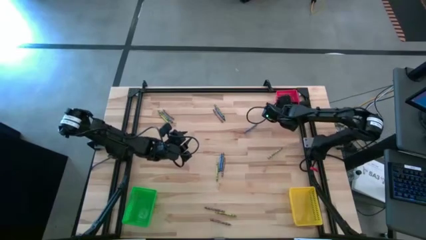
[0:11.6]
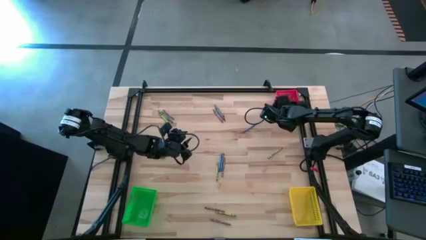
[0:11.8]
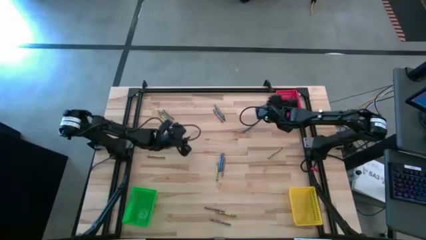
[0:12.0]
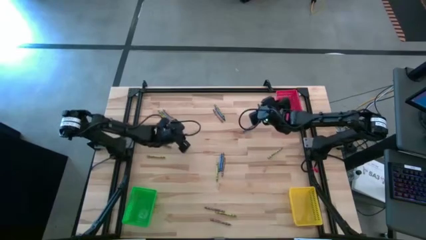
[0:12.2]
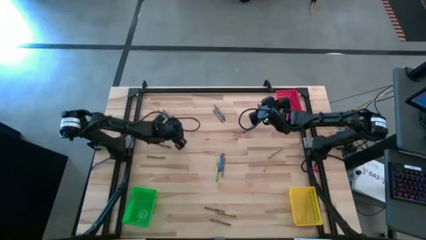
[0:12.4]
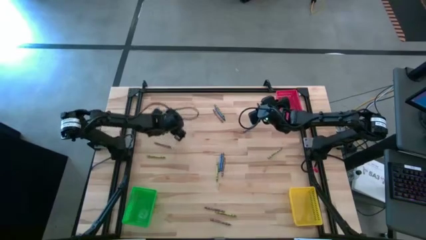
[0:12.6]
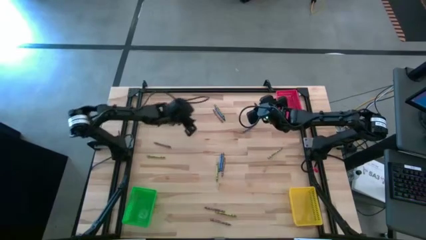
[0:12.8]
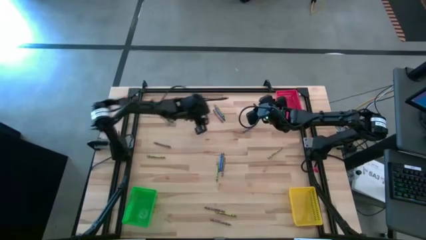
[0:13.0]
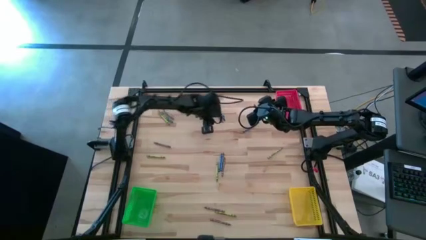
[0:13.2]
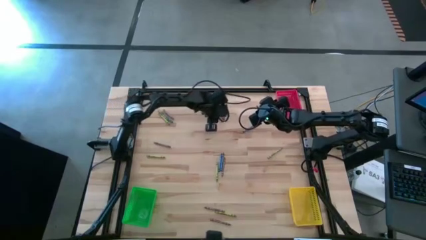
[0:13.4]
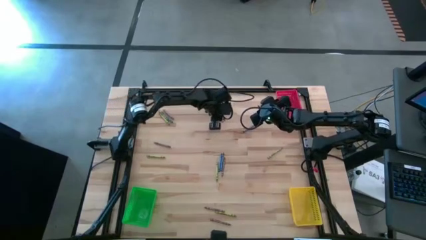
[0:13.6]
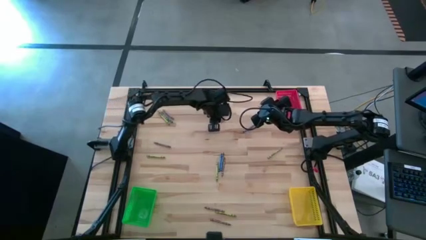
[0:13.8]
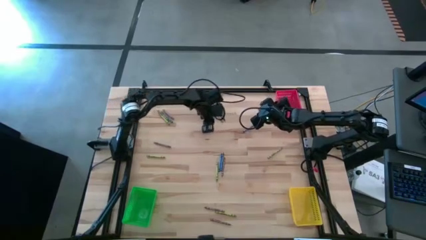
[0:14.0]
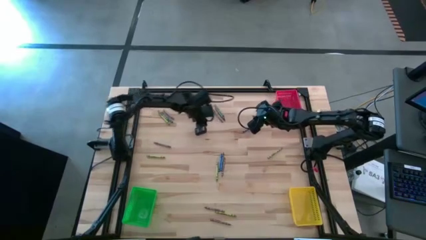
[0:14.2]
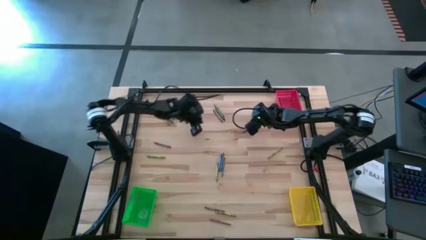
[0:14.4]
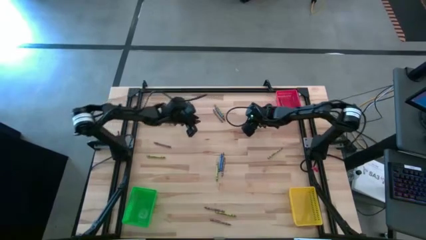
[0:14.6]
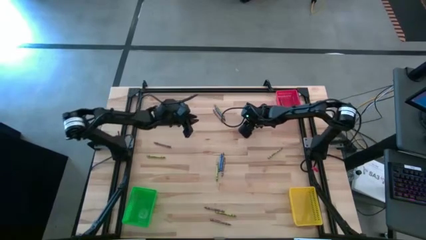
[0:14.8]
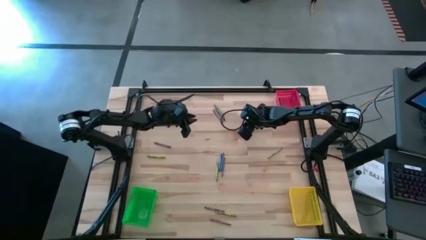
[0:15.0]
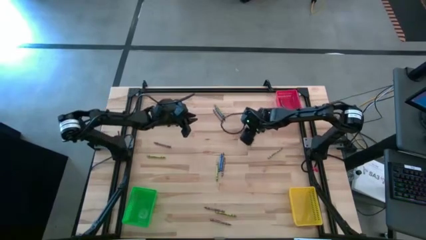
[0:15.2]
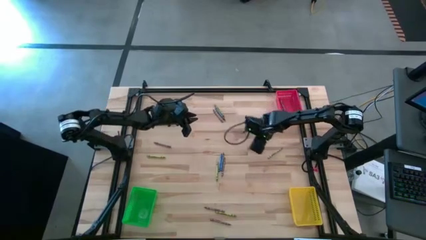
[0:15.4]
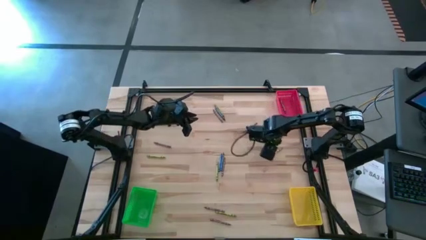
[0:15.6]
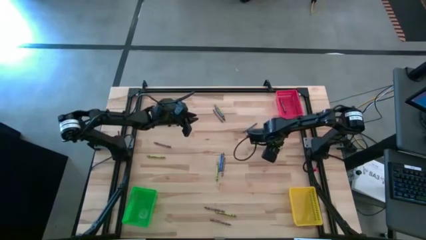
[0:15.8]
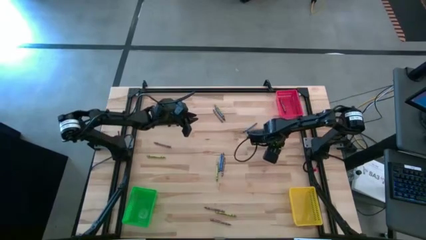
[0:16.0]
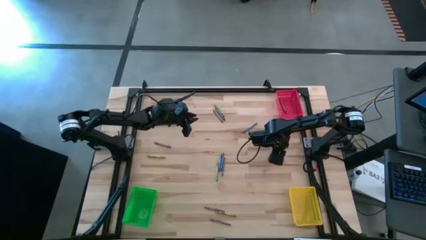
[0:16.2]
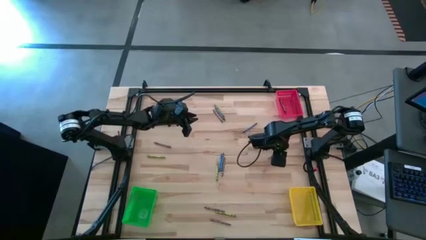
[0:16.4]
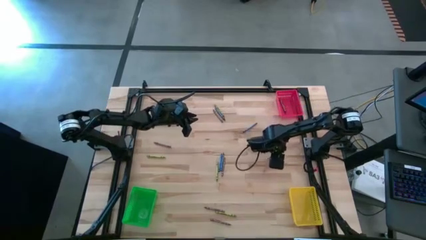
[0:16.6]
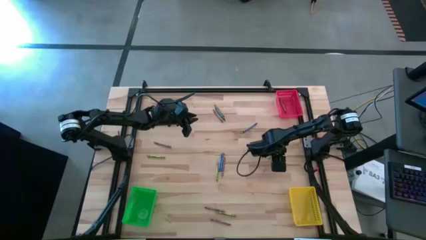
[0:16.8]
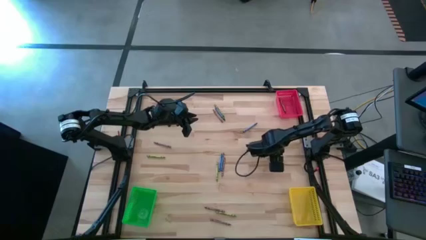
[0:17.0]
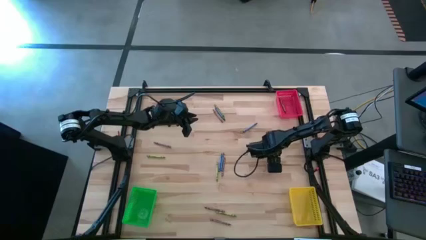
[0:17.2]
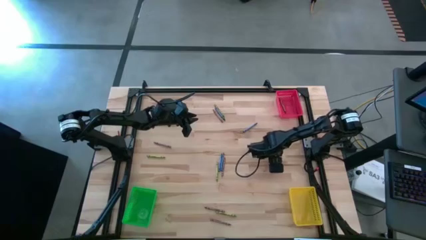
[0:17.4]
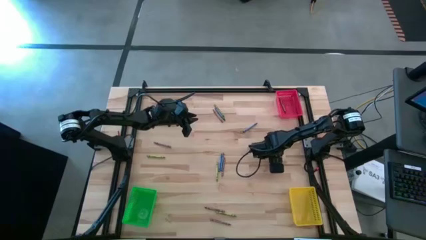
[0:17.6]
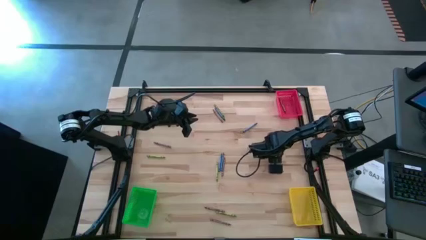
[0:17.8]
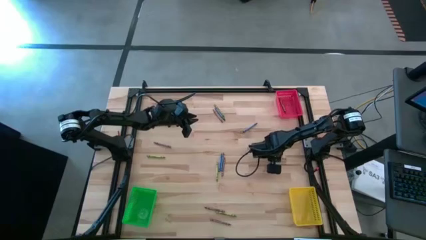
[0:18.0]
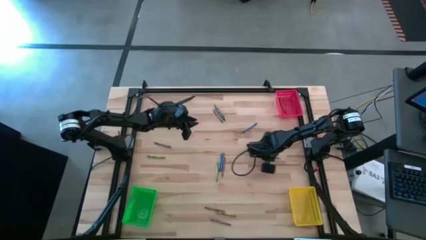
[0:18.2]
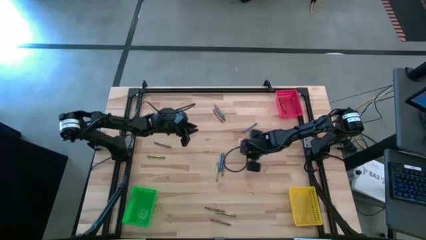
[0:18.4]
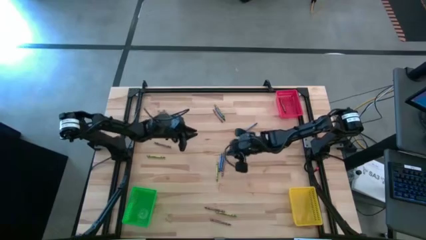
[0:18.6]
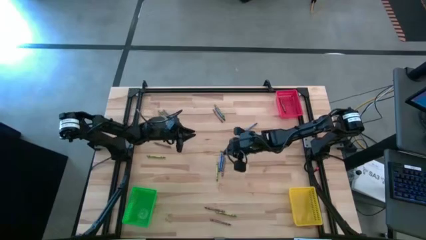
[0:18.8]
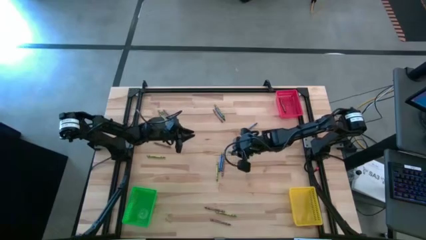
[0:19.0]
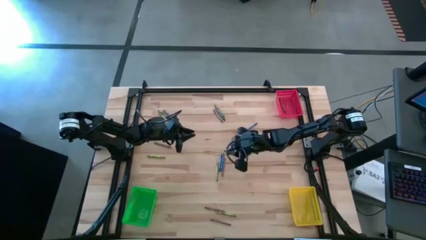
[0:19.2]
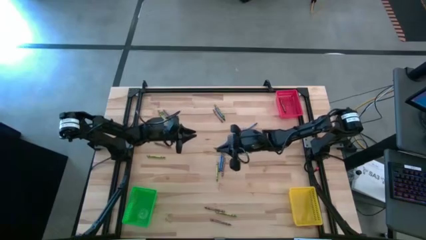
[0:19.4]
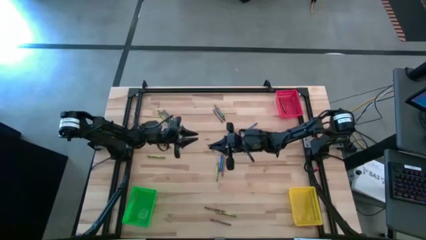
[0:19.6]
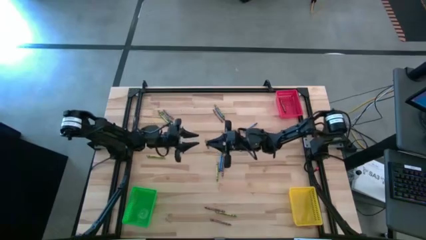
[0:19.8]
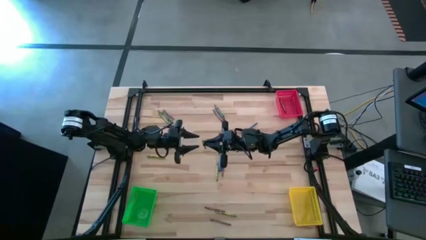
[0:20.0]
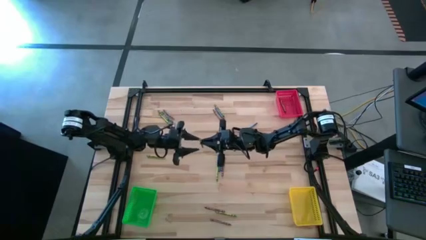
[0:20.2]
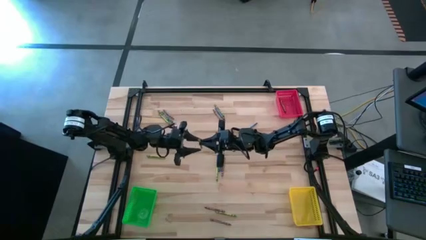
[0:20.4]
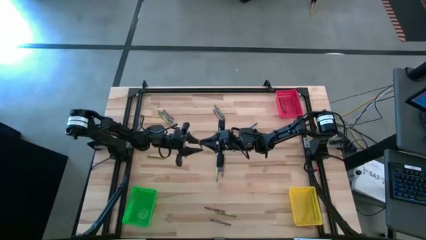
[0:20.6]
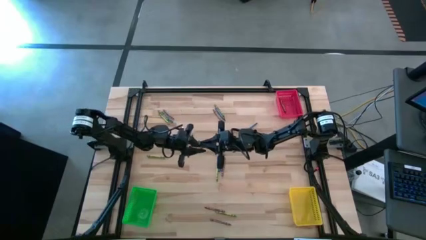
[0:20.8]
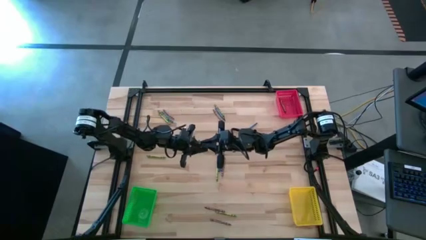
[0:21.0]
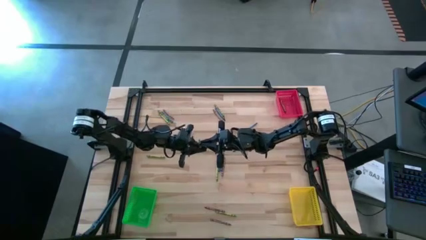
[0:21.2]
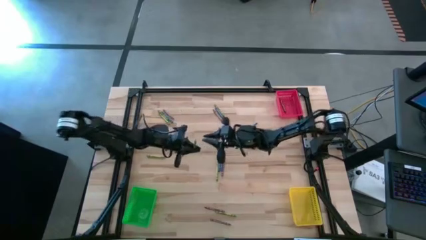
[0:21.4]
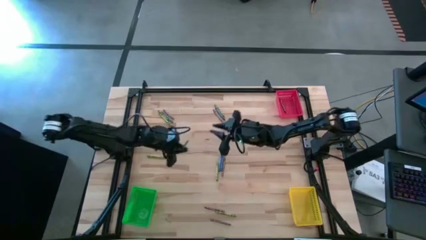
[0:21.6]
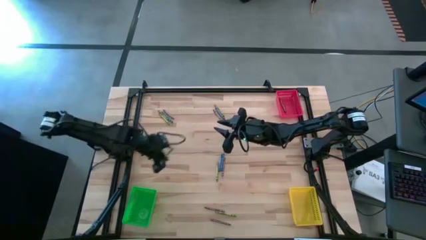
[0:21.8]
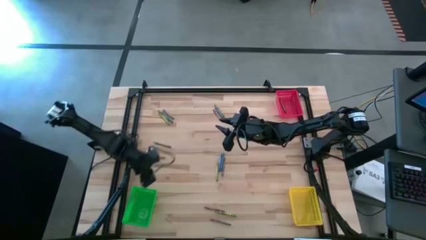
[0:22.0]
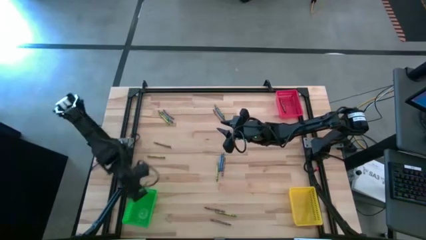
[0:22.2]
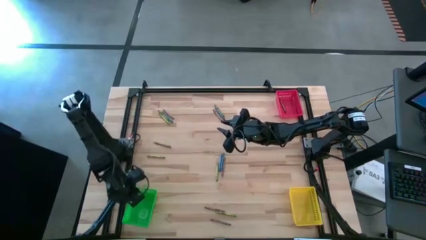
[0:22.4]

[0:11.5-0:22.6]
Task: Sort crayons
Put the green crayon into the green bin

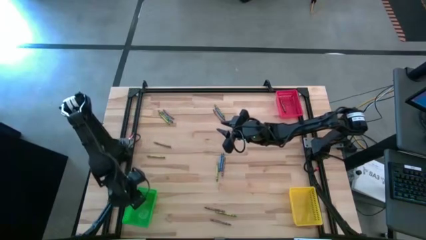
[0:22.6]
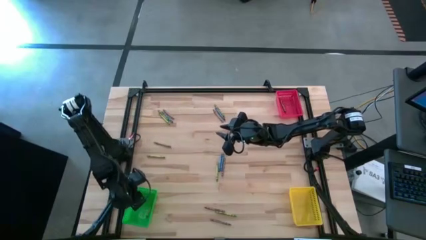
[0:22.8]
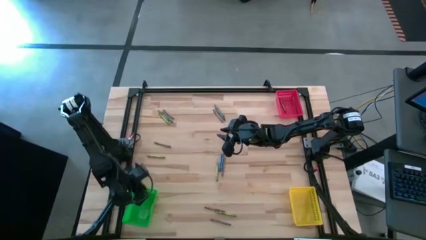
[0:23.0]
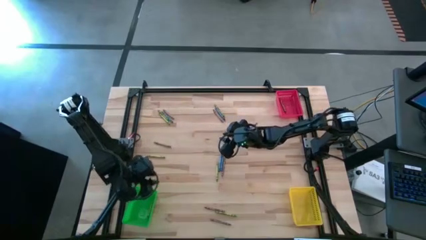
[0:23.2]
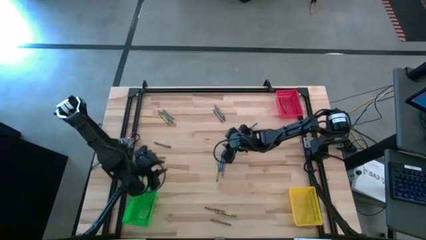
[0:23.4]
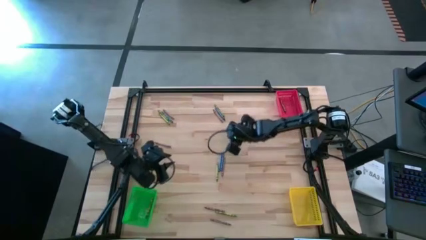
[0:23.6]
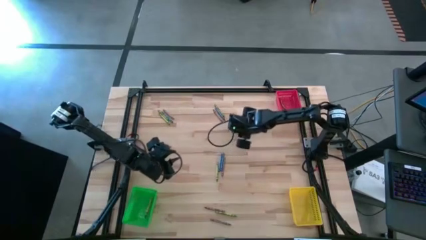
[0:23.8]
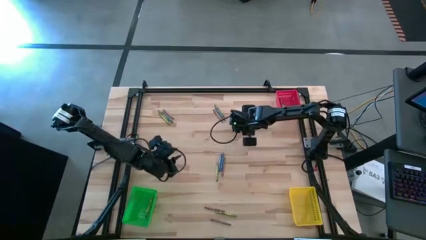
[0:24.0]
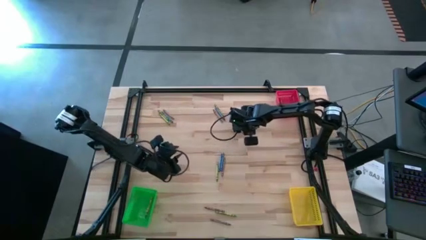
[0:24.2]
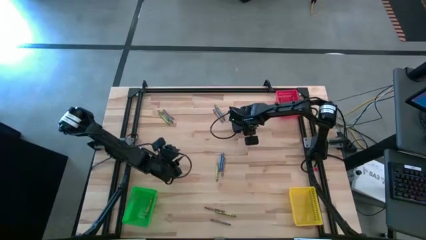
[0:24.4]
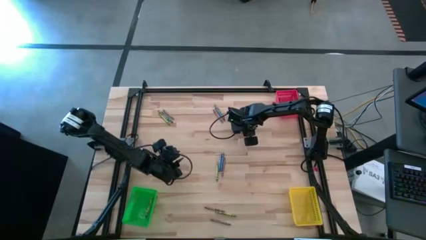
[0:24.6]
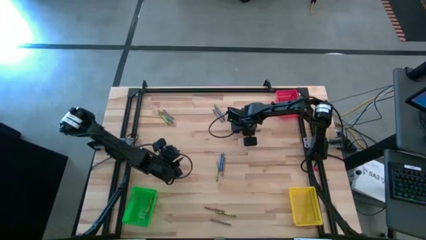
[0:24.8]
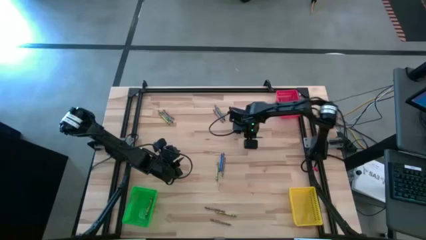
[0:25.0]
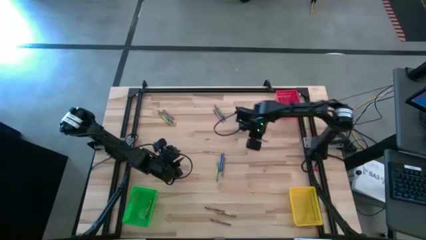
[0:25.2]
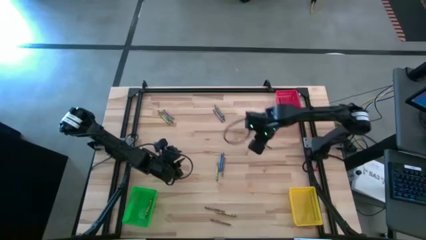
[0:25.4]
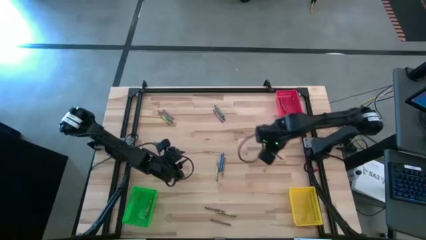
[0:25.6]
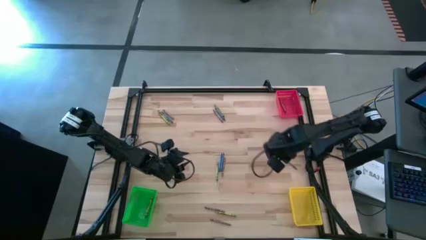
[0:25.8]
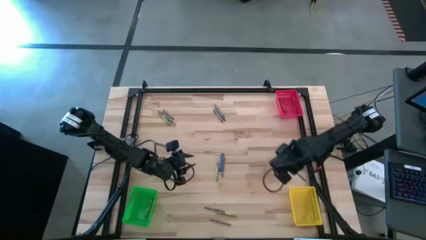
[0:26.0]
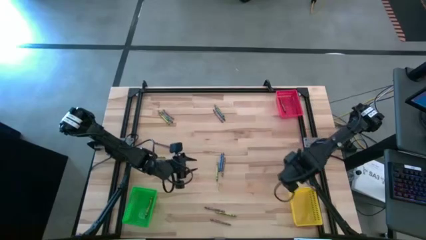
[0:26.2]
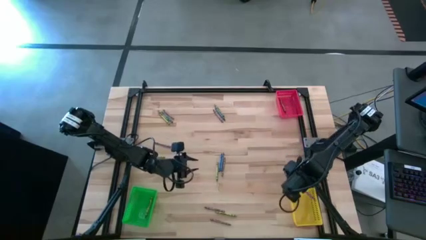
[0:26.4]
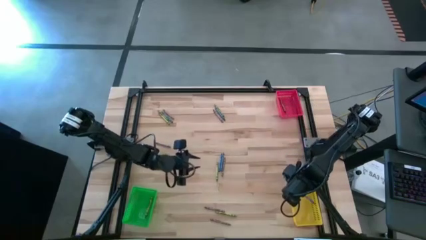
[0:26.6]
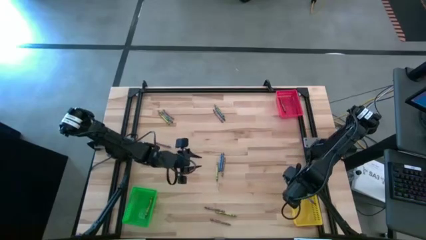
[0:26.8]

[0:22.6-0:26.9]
Put the blue crayon into the yellow bin

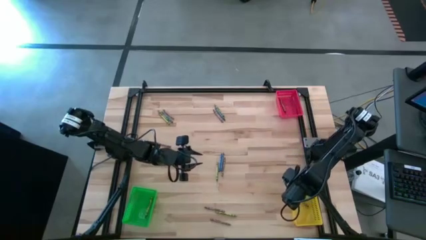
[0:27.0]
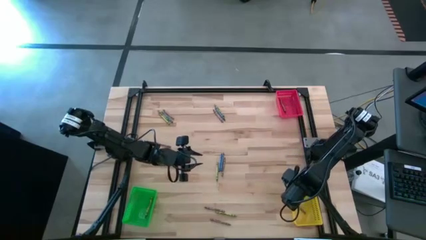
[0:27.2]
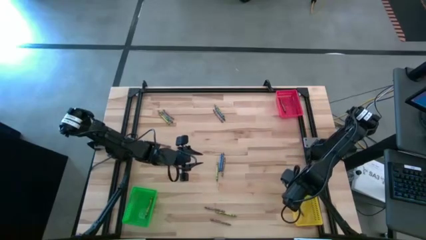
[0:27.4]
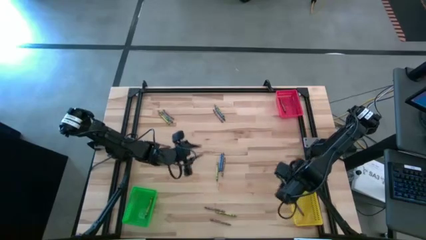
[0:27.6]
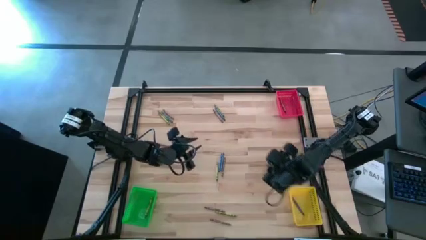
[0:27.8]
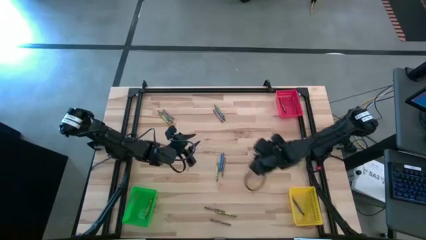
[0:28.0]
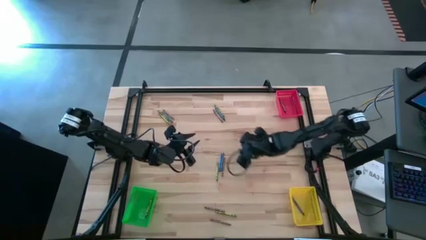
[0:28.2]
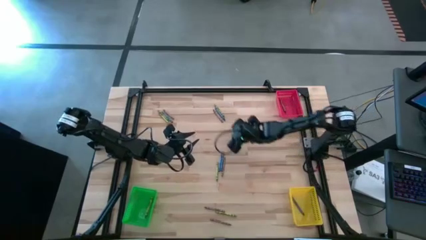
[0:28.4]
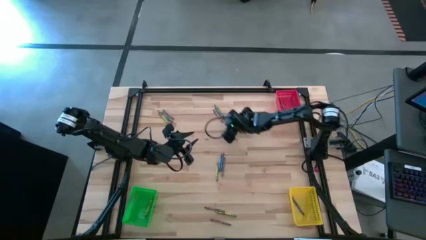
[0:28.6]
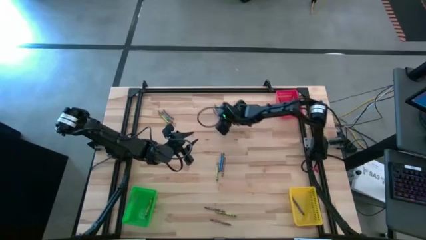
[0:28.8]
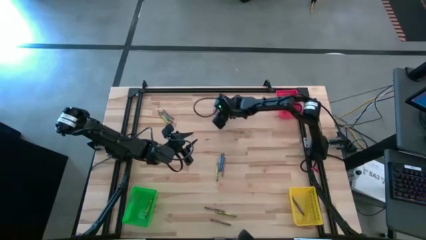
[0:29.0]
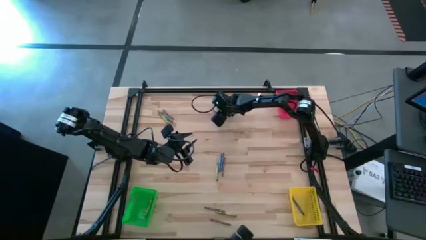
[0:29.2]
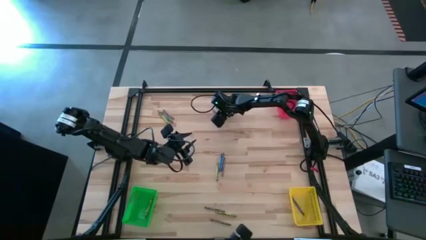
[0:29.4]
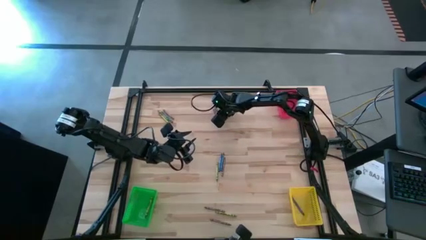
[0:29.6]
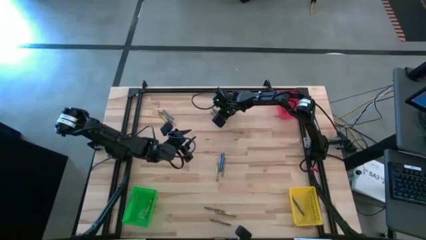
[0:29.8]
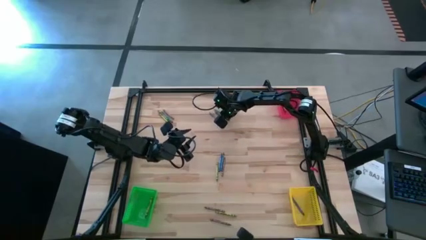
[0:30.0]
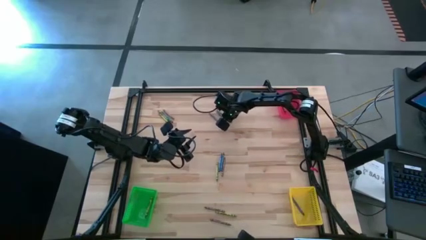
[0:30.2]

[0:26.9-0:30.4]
Put the blue crayon into the green bin
